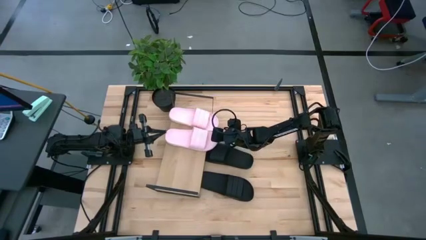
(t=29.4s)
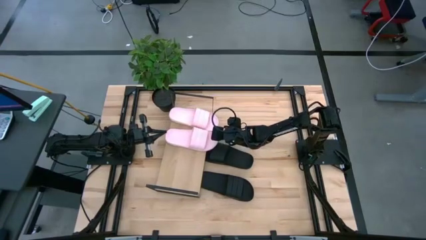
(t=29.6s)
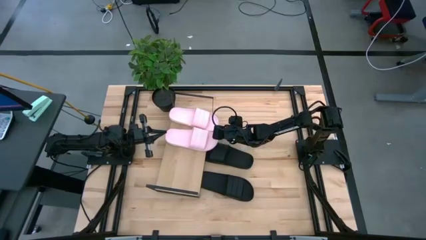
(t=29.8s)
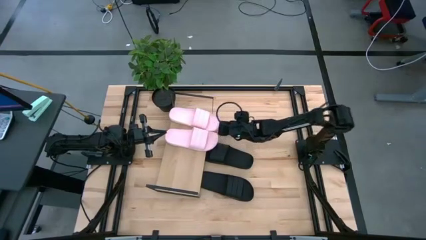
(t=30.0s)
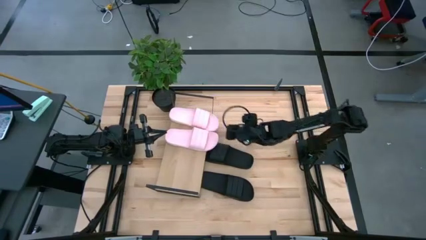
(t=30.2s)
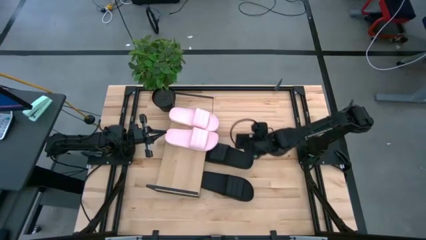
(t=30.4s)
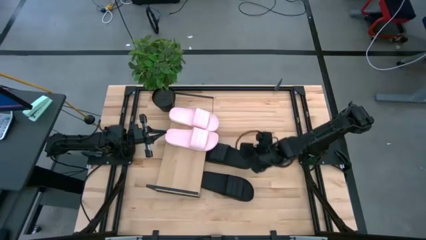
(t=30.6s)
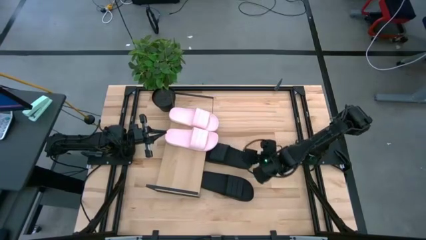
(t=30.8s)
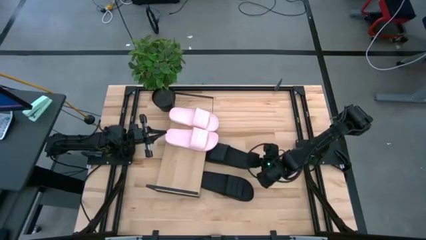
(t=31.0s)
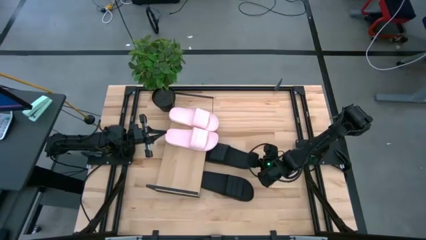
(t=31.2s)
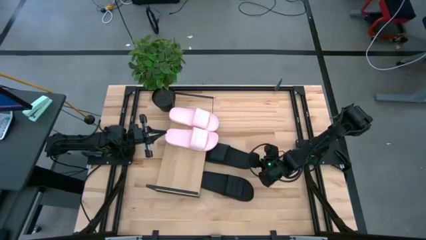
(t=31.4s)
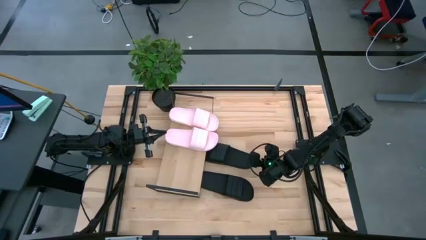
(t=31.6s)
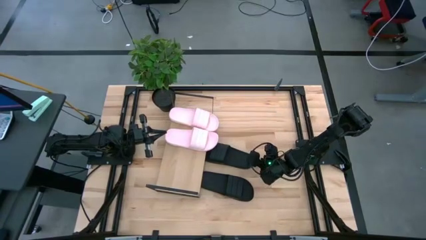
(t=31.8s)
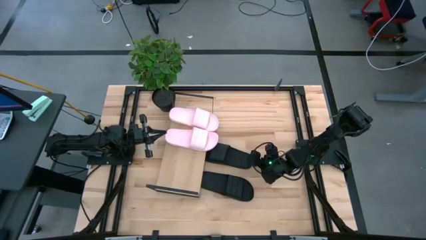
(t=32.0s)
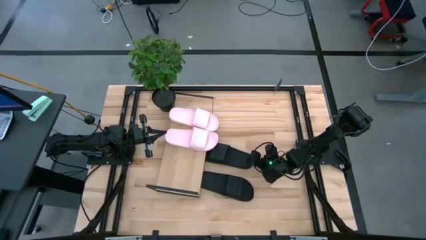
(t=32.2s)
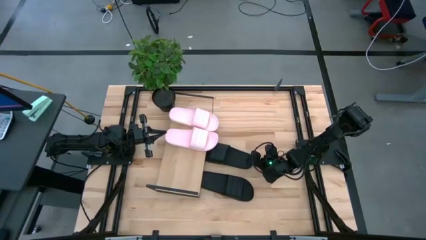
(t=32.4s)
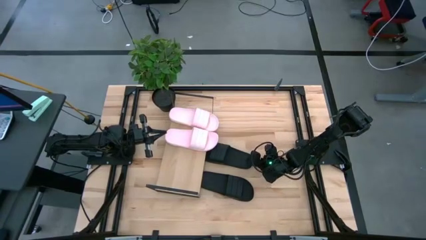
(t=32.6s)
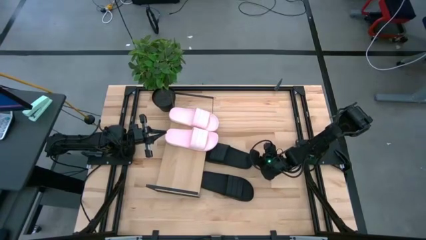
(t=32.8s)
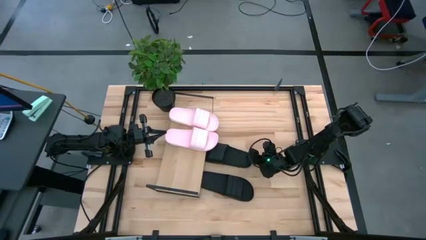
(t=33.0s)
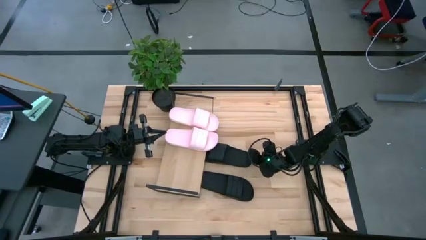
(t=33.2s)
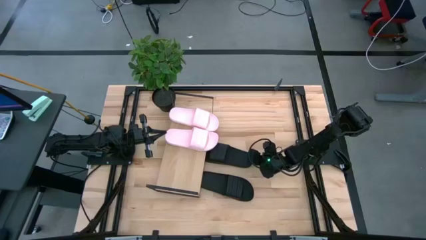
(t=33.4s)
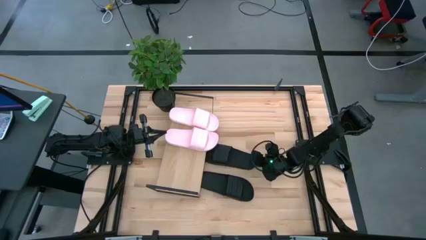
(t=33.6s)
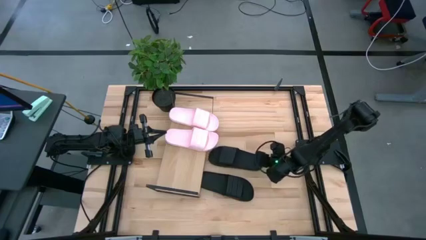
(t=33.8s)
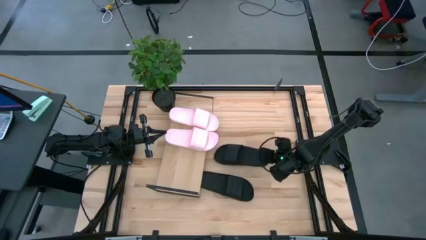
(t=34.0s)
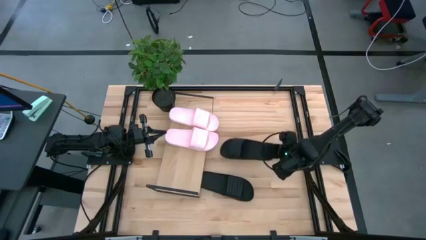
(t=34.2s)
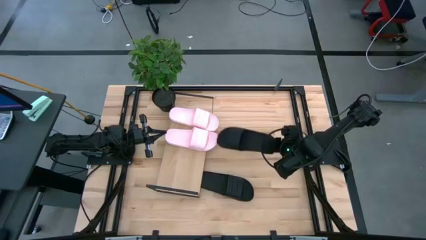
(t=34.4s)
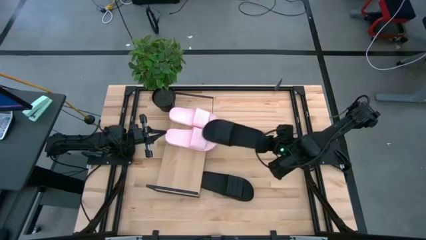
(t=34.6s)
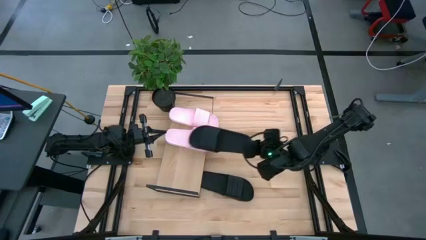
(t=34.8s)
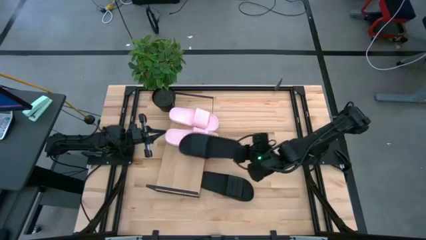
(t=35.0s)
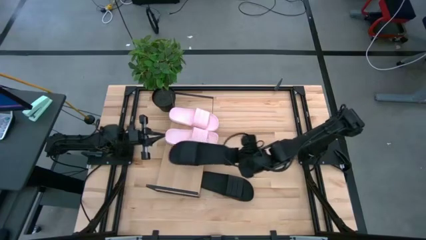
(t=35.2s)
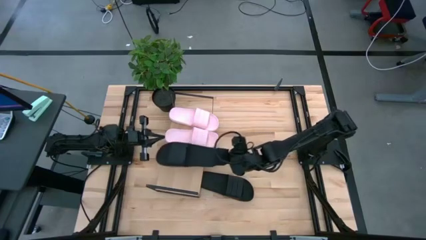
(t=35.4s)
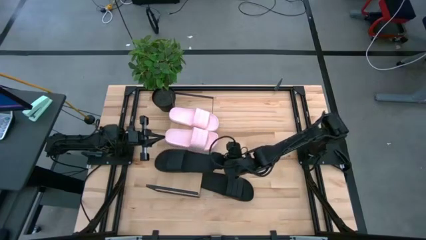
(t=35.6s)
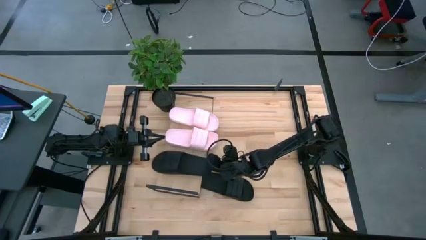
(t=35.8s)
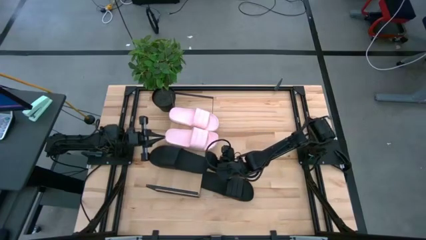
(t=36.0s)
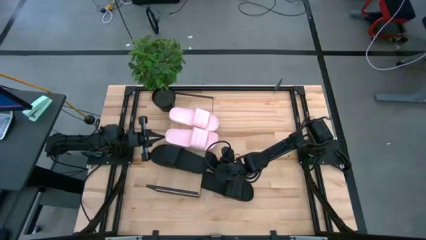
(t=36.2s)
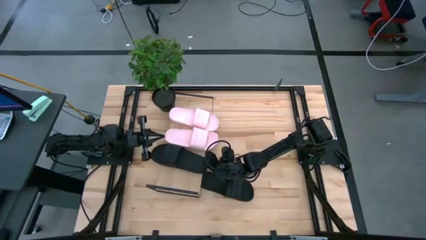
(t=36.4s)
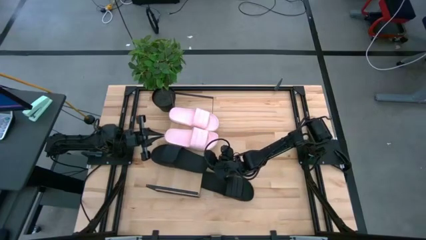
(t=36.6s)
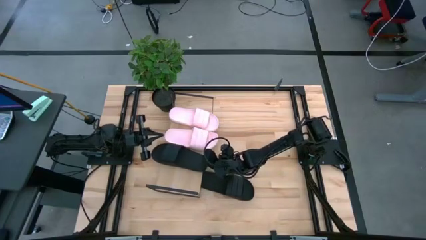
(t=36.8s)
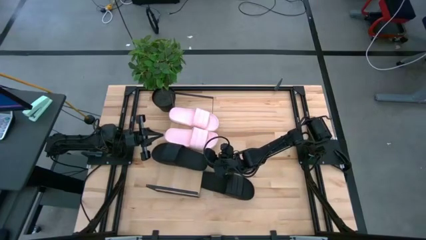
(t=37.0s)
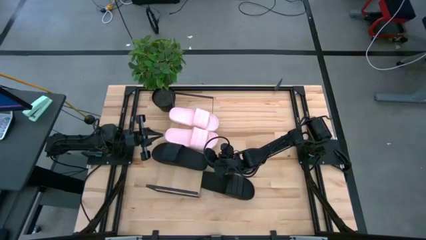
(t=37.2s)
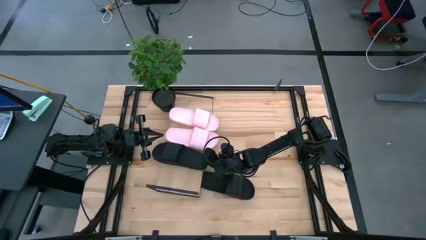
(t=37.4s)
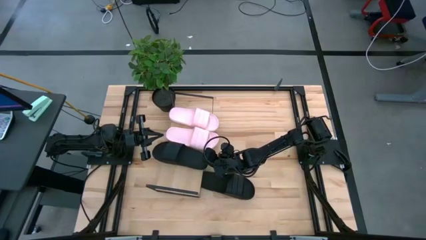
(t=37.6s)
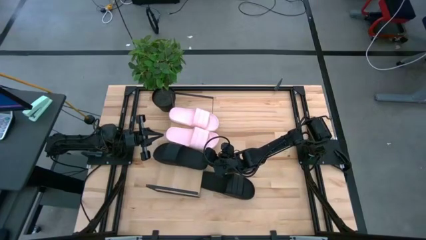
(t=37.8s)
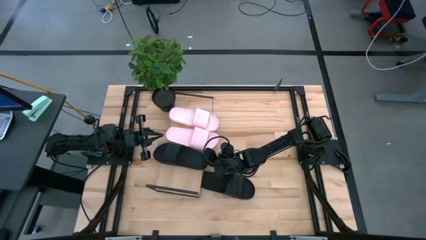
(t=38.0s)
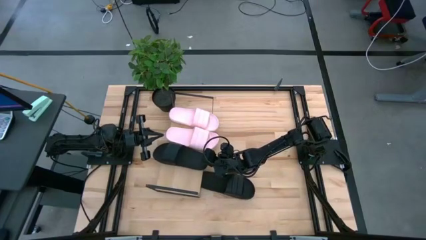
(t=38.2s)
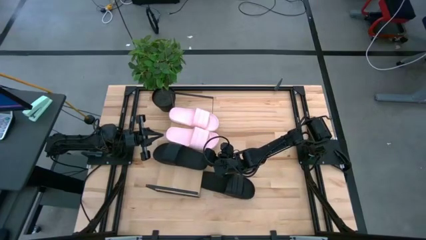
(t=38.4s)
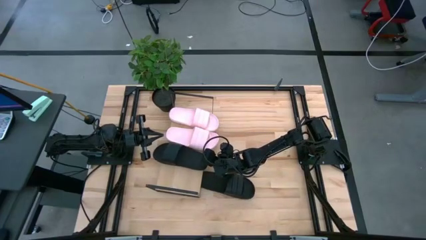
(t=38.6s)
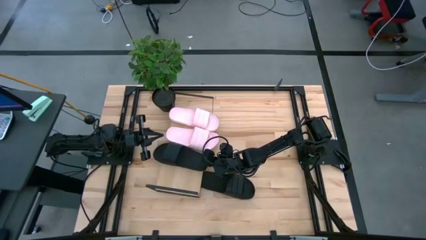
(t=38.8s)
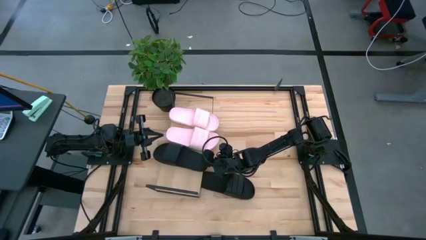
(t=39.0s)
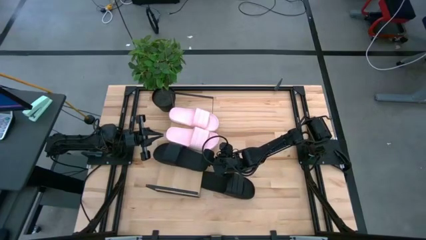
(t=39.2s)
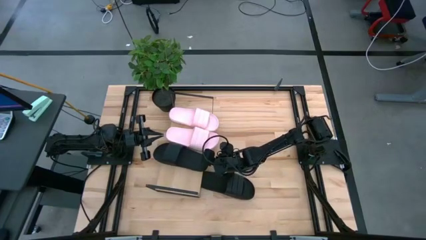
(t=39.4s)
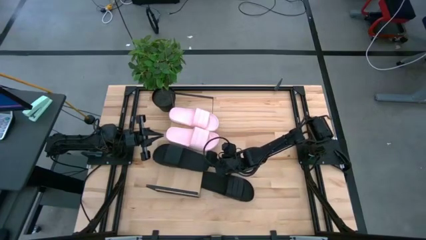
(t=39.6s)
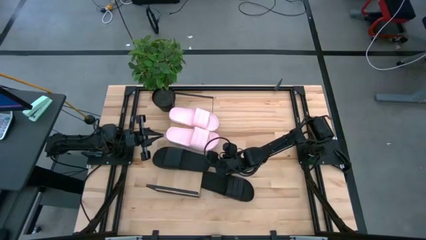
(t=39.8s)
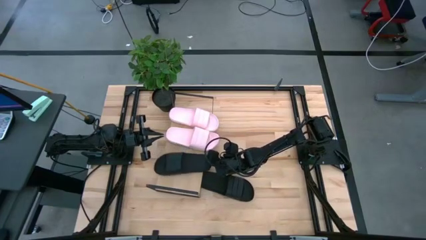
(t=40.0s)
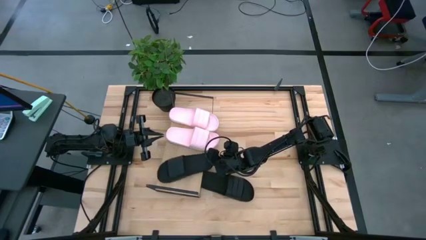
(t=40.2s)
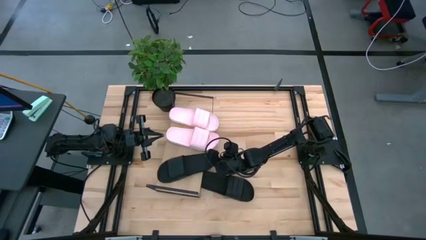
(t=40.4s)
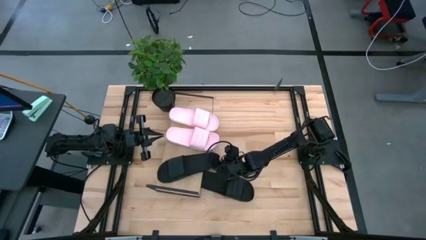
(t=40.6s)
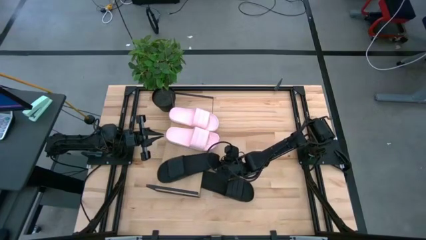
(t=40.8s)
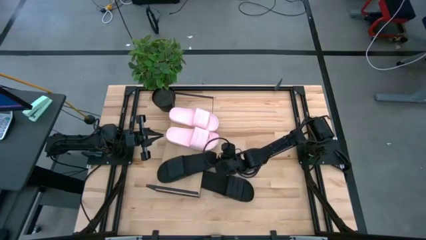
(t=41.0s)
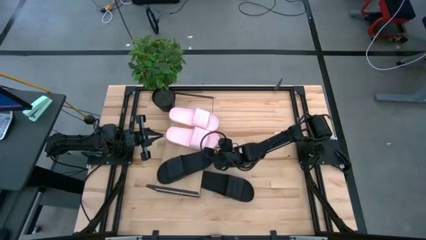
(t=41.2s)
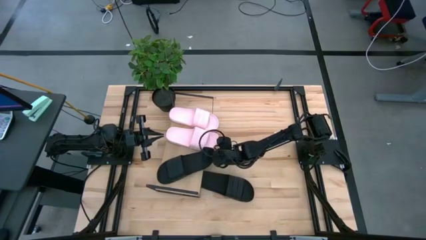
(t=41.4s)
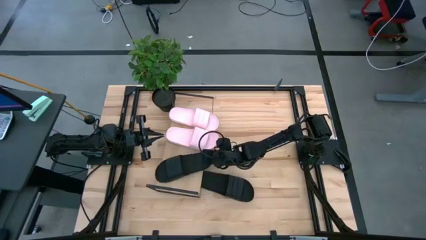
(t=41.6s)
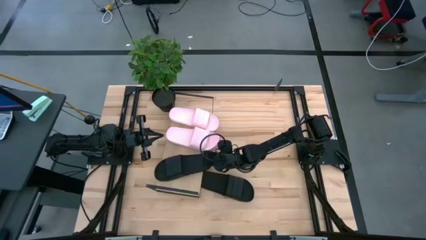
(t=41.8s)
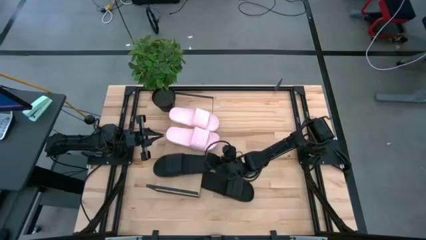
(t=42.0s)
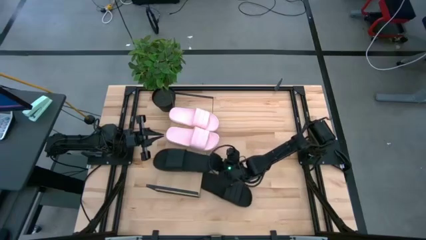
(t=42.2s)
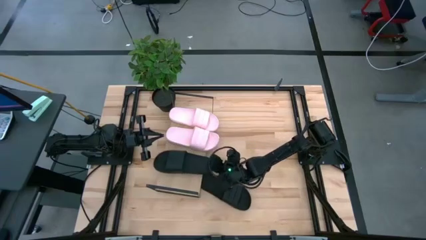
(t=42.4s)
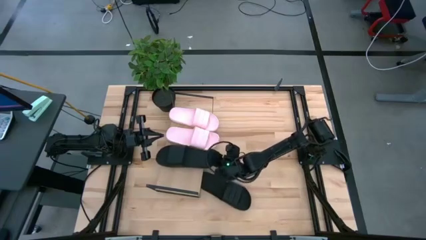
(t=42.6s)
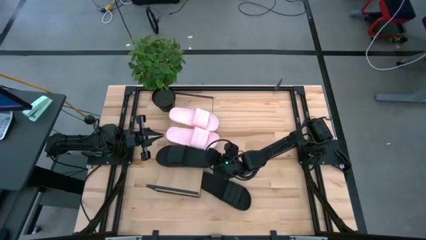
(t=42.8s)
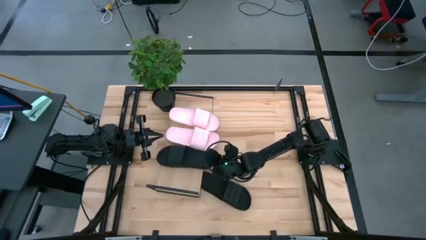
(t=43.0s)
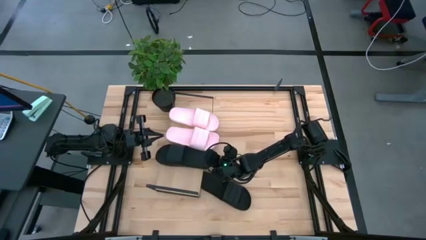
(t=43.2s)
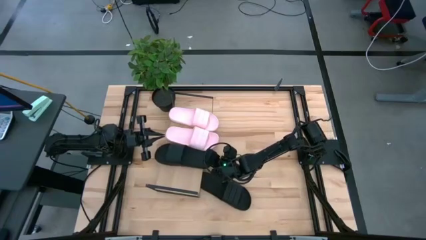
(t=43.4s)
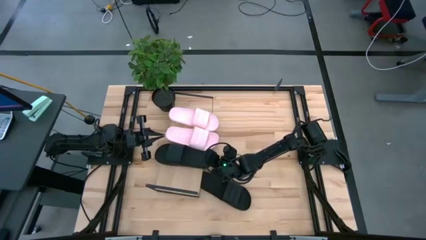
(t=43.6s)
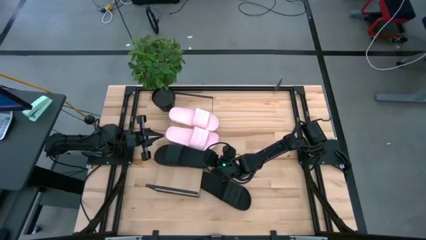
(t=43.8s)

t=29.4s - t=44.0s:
Task: Pick and place slides into the shelf
Put the top black slipper on the shelf
